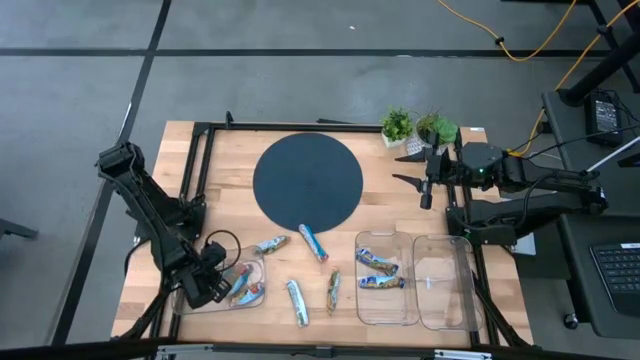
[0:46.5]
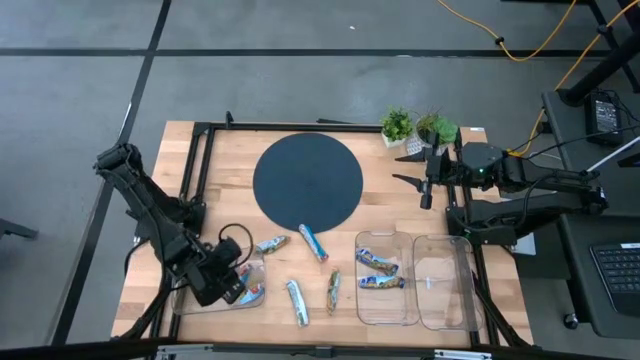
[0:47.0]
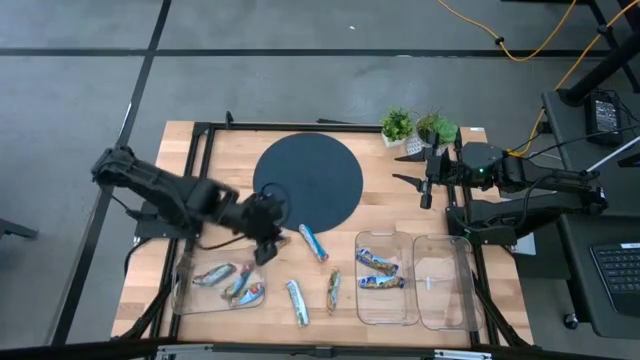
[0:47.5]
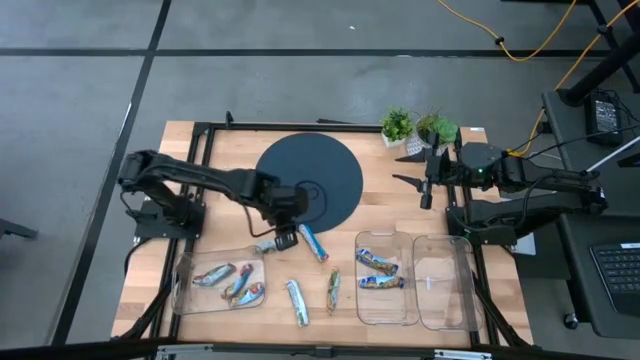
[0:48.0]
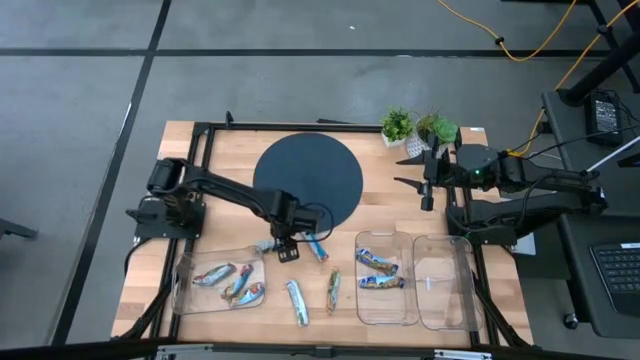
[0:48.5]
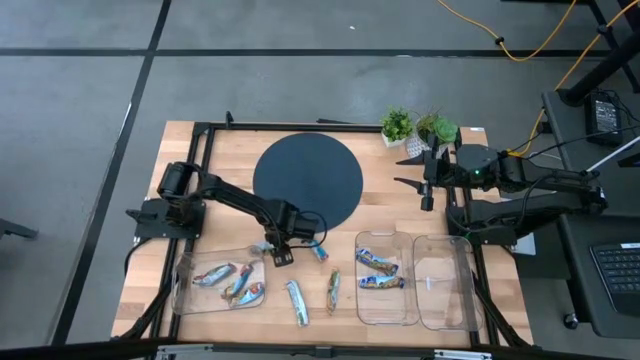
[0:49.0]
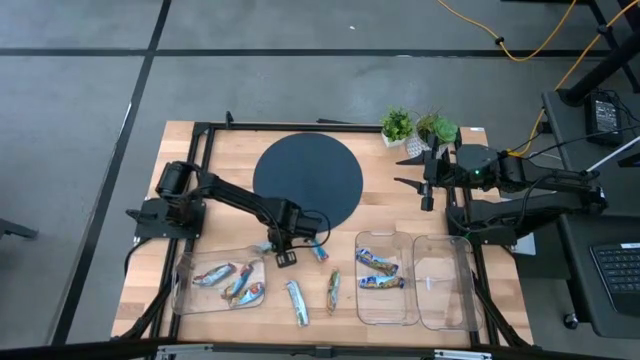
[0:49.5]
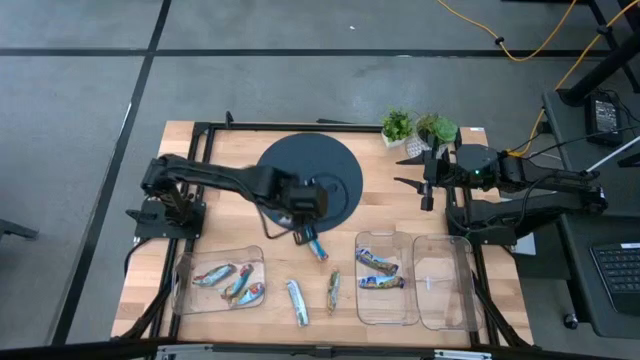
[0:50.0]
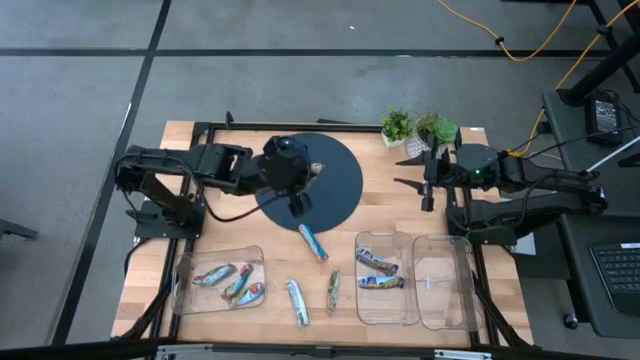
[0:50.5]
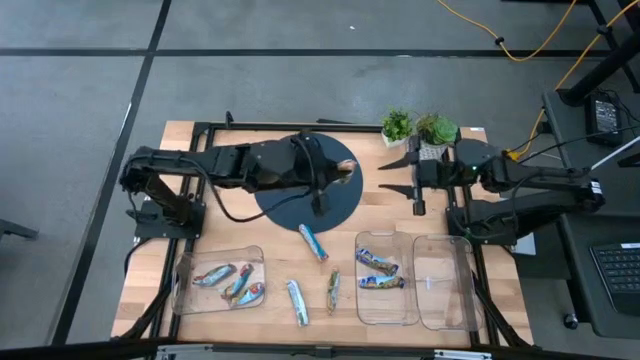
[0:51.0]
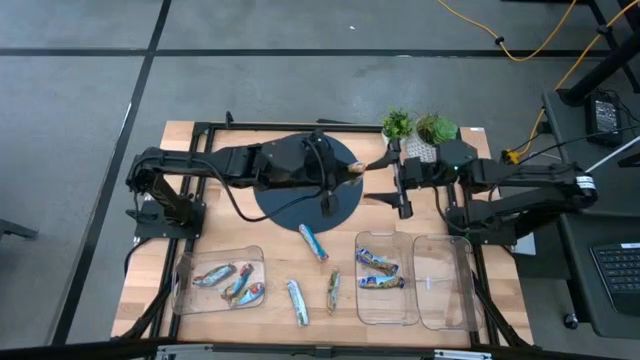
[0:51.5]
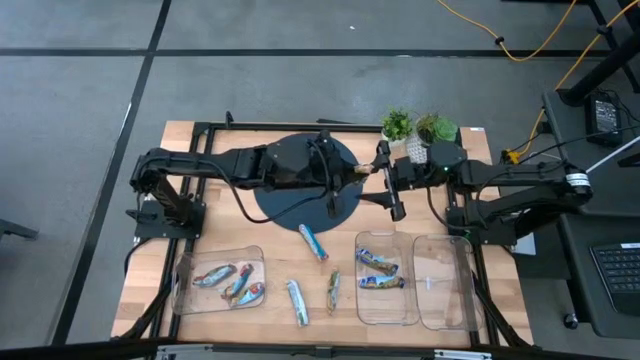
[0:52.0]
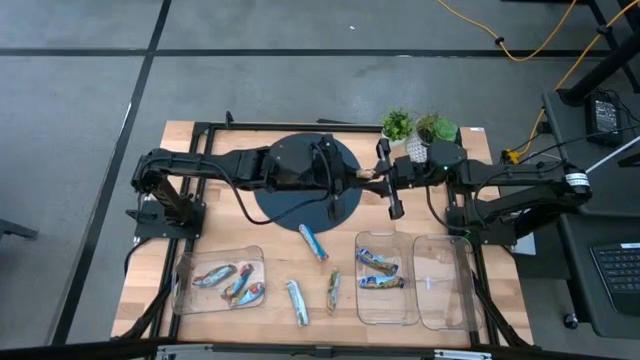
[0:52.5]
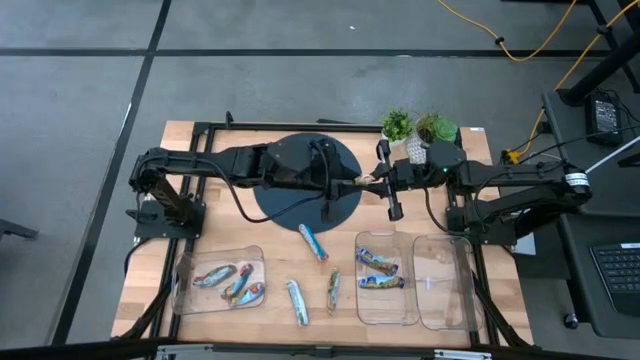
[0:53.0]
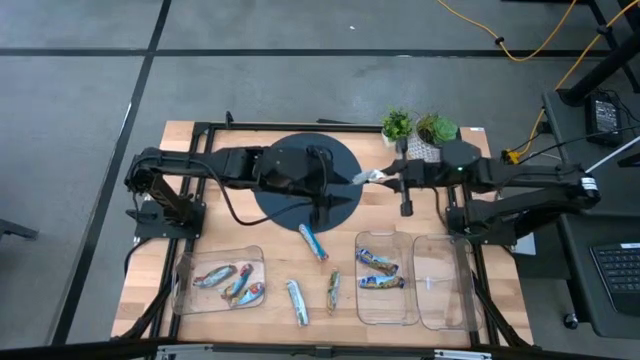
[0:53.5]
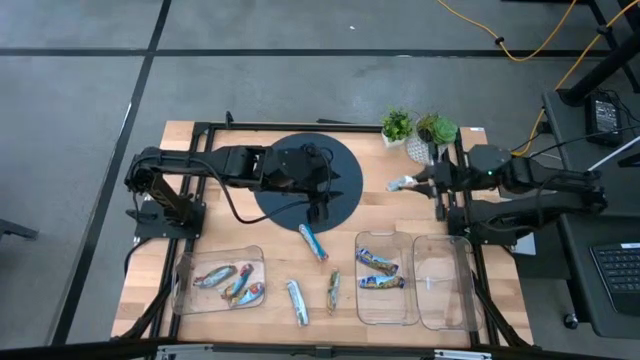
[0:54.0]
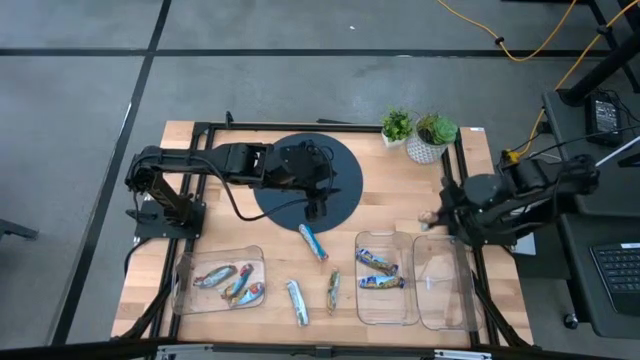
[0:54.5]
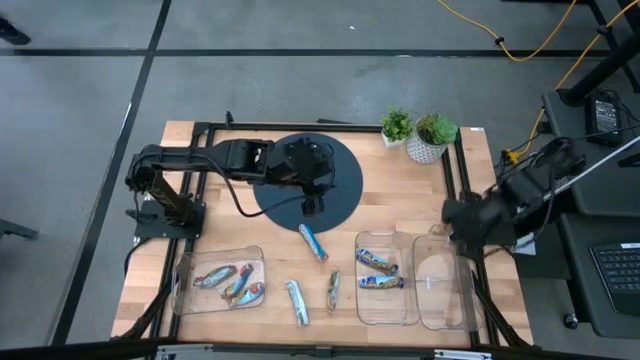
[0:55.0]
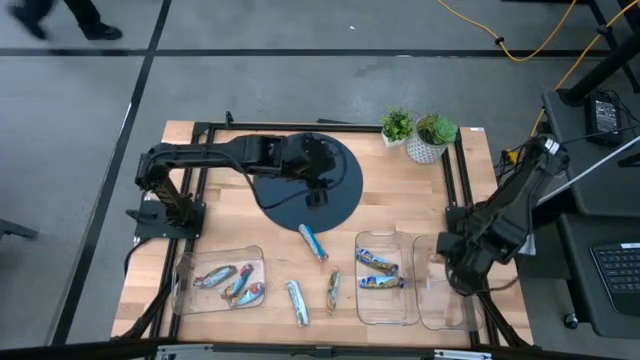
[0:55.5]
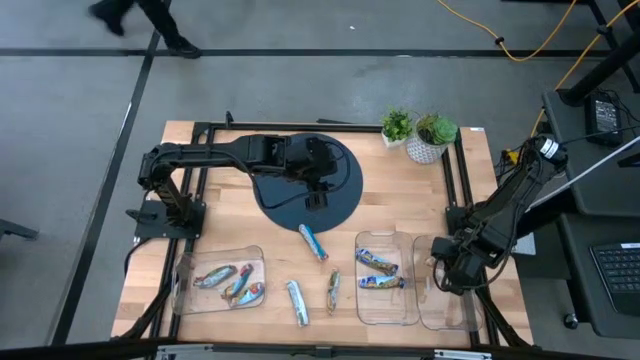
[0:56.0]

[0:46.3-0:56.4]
Task: Pick and place Granola Bars by type
Put the yellow granola bar into the right transparent bin

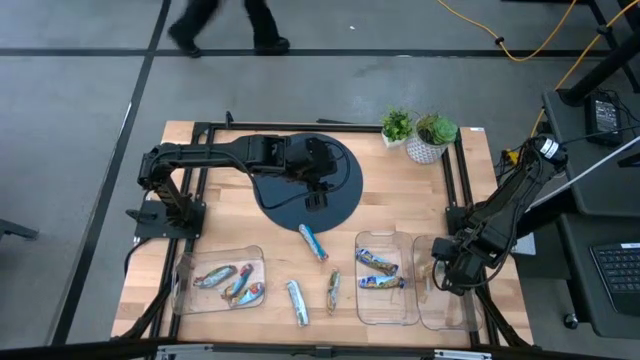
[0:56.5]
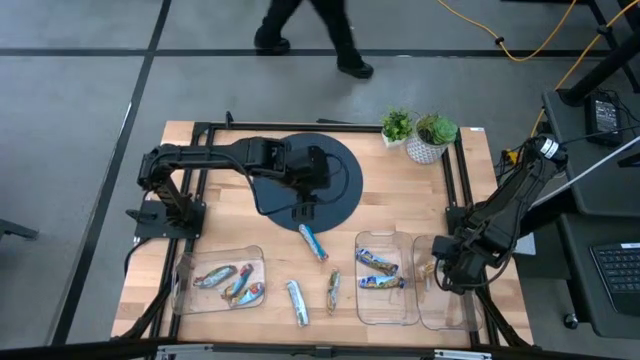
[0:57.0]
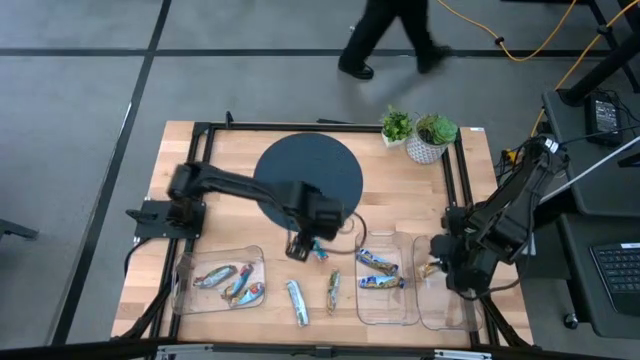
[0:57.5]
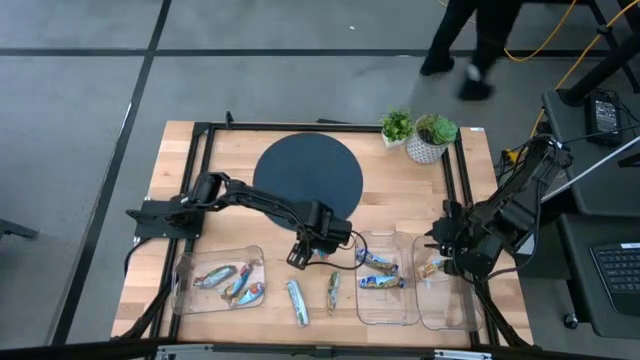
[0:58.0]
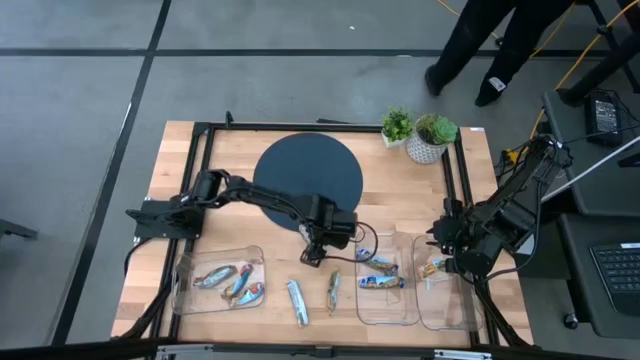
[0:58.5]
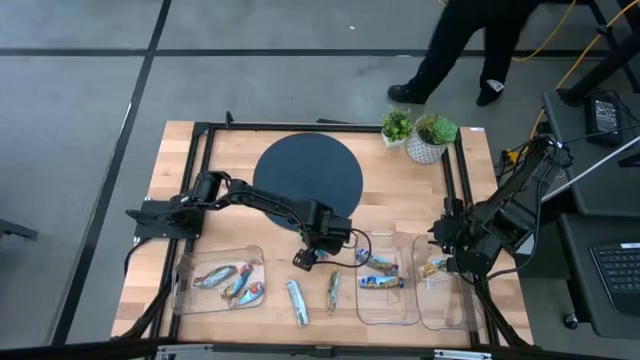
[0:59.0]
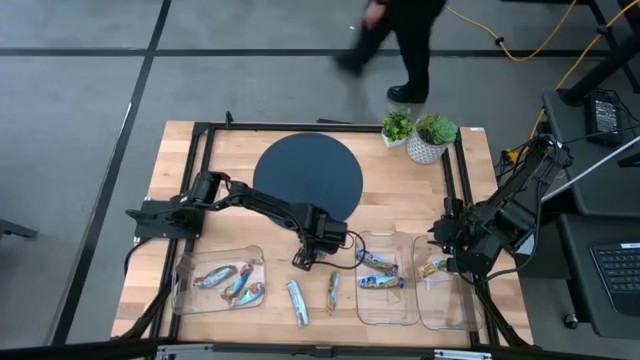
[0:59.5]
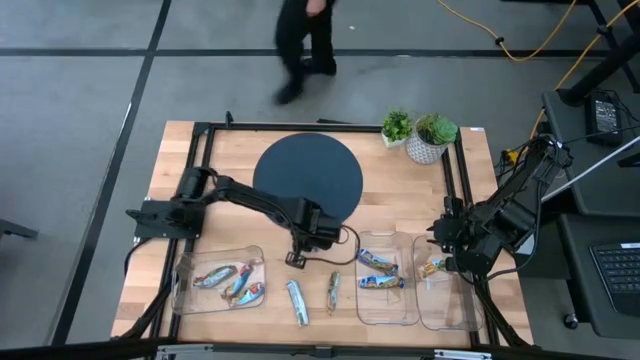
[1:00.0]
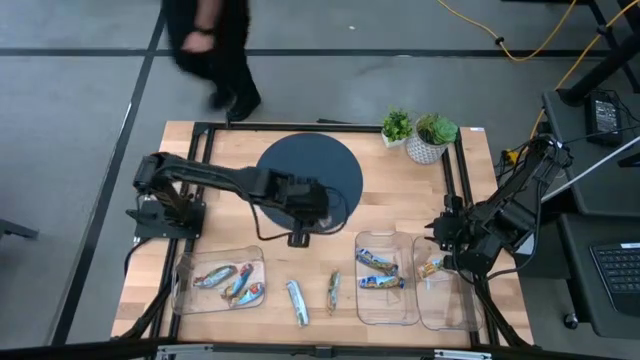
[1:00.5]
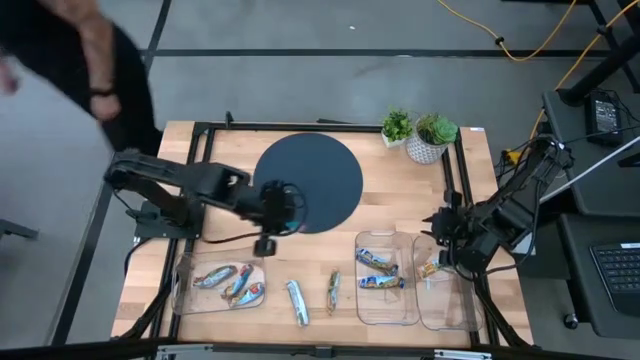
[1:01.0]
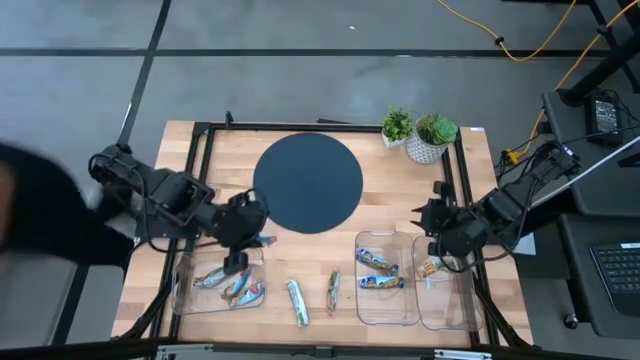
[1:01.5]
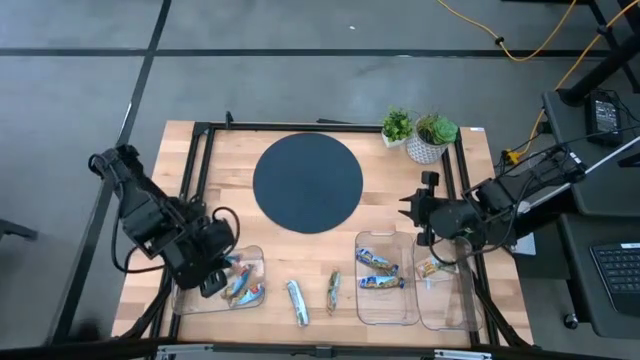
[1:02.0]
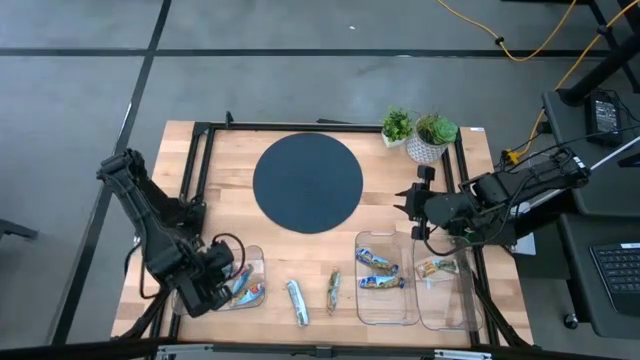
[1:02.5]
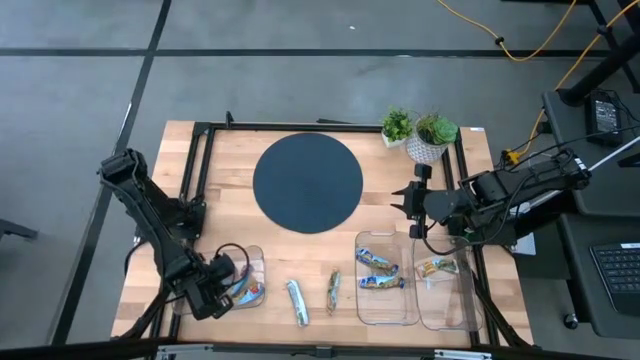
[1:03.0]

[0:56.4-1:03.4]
Put the red granola bar into the left transparent bin

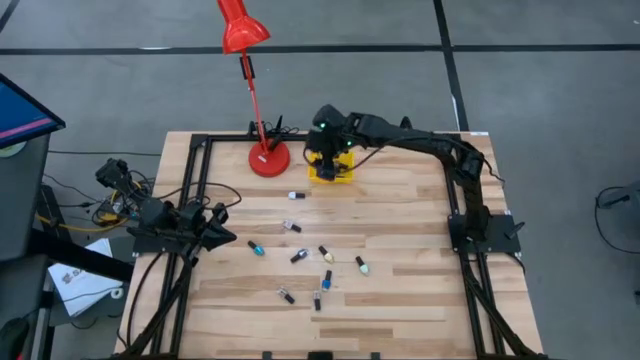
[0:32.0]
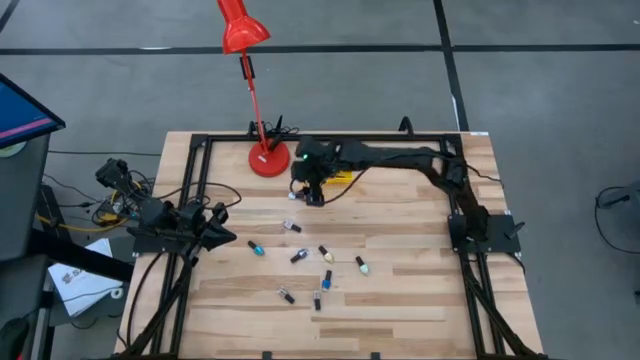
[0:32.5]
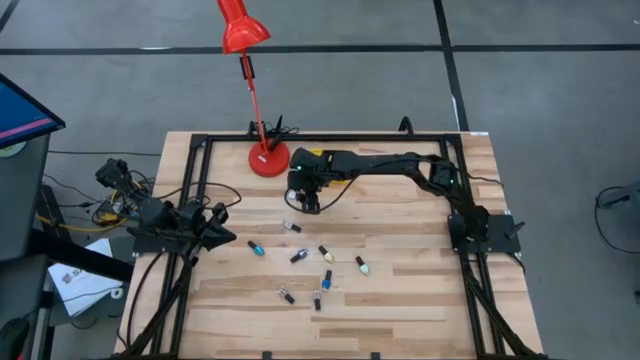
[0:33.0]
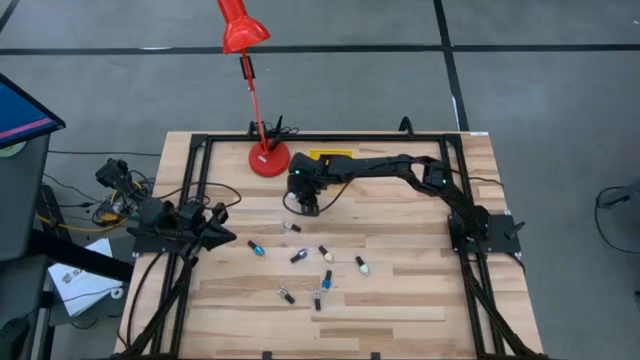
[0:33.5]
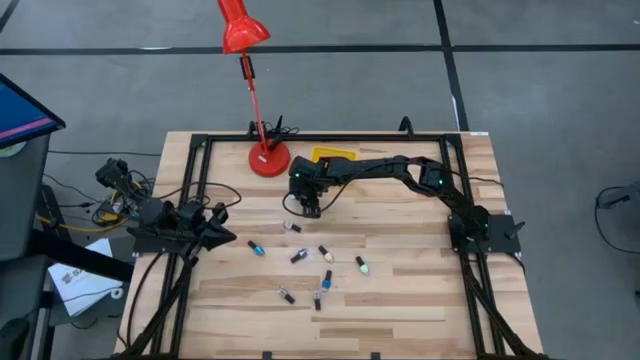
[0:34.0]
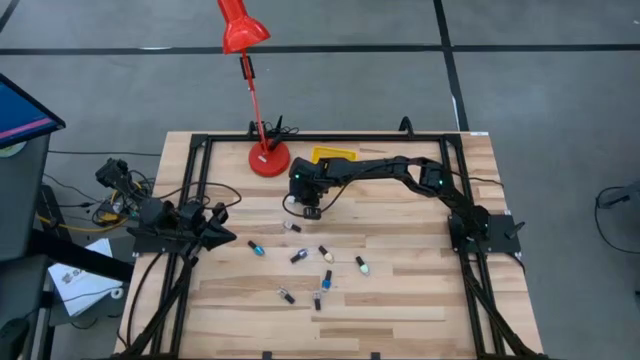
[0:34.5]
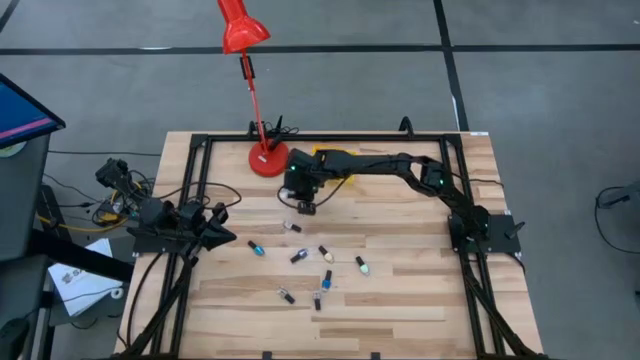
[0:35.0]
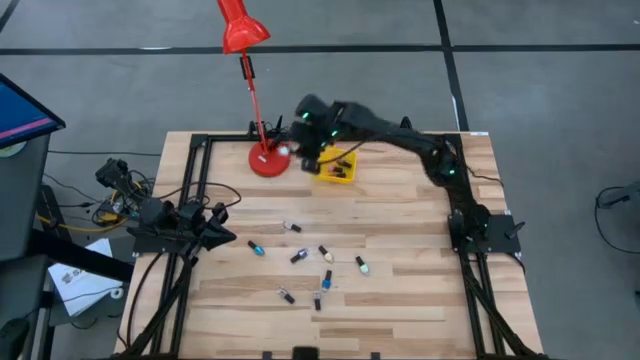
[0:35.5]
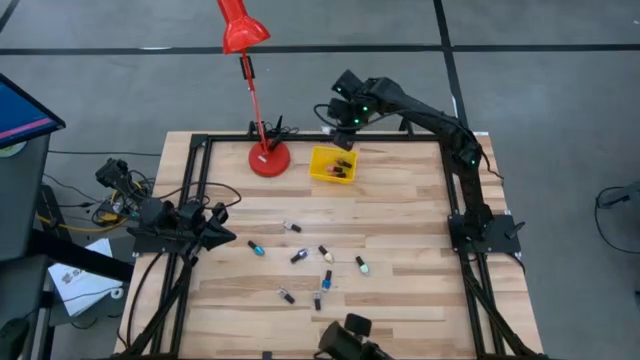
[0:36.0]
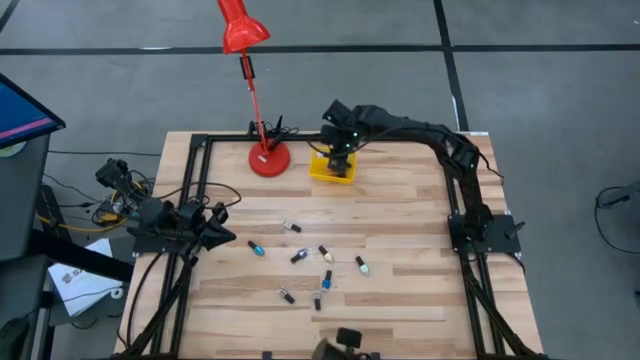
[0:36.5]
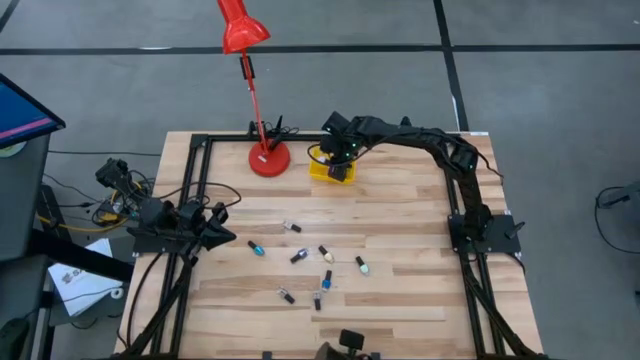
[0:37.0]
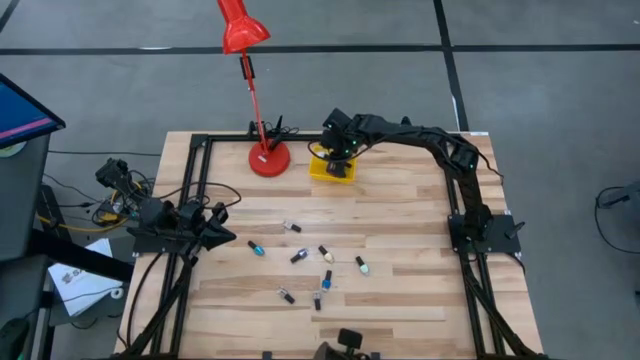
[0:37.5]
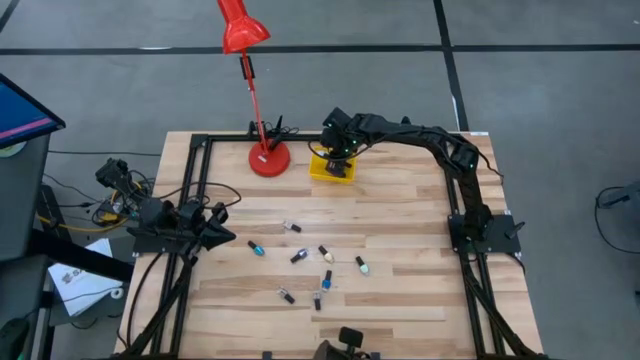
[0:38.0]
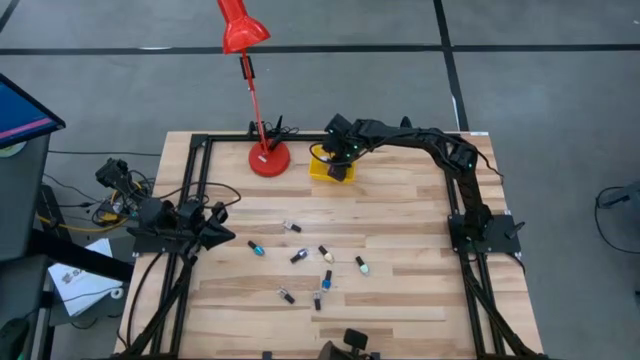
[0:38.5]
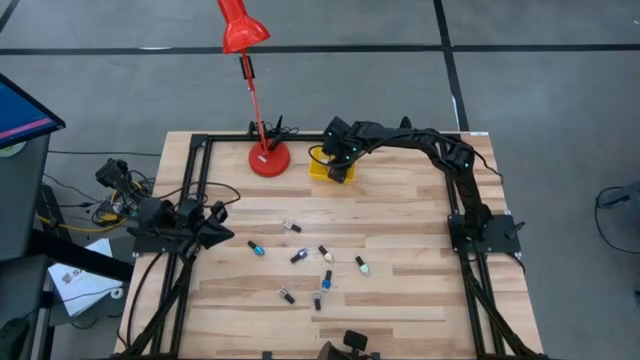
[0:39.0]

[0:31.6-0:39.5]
Task: Pick & Place Nail Polish
Put the top white nail polish bottle into the yellow bin
